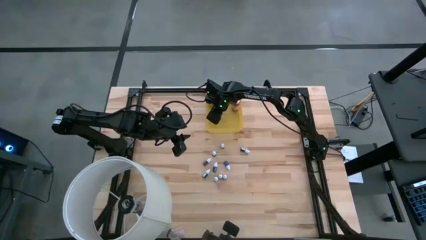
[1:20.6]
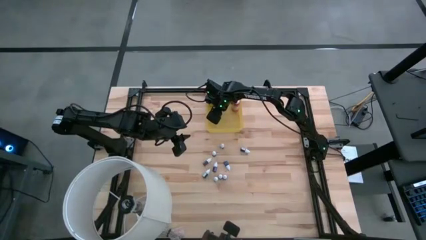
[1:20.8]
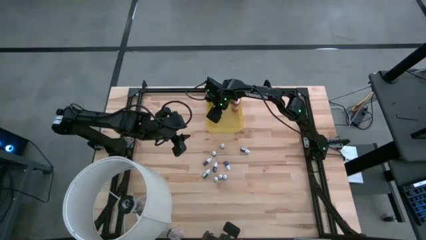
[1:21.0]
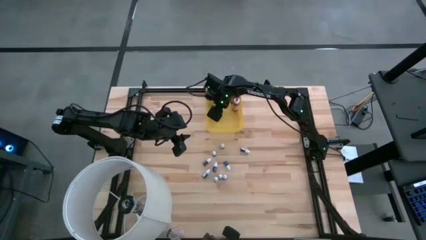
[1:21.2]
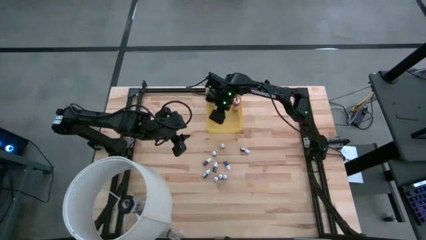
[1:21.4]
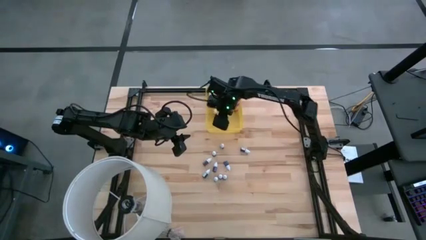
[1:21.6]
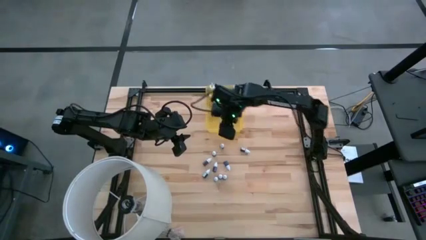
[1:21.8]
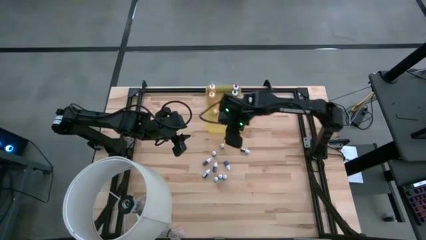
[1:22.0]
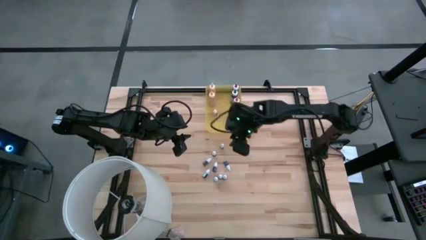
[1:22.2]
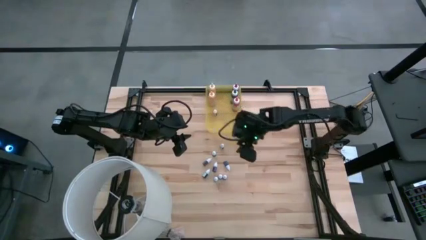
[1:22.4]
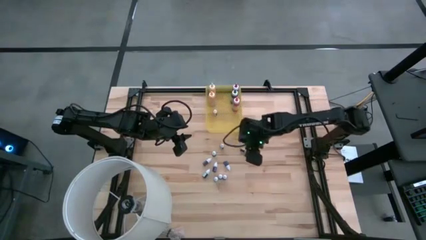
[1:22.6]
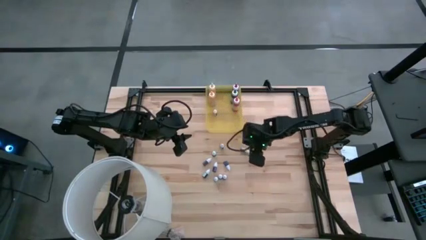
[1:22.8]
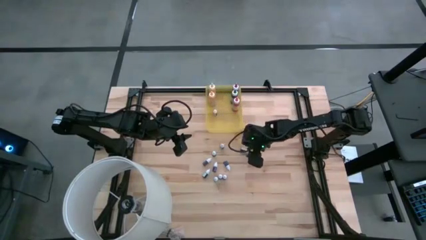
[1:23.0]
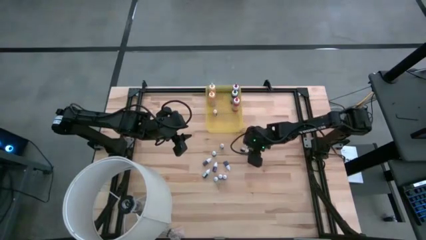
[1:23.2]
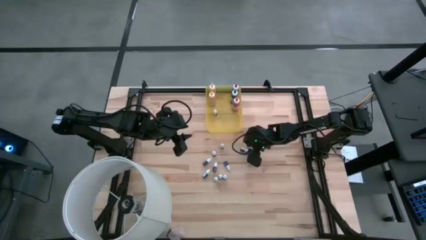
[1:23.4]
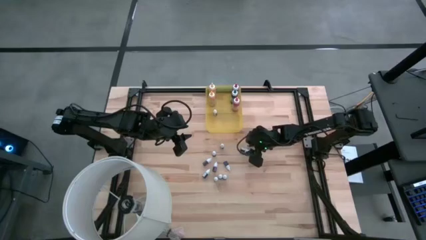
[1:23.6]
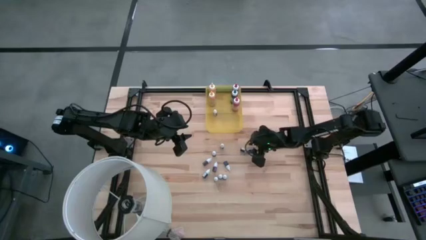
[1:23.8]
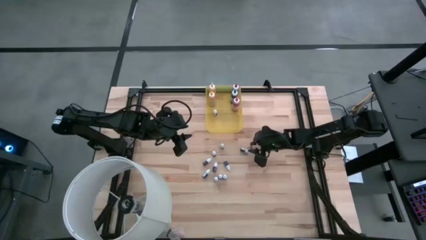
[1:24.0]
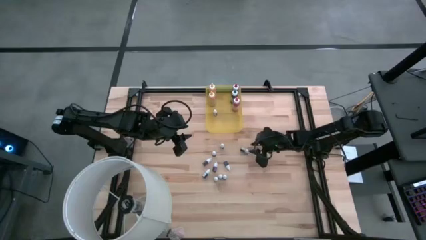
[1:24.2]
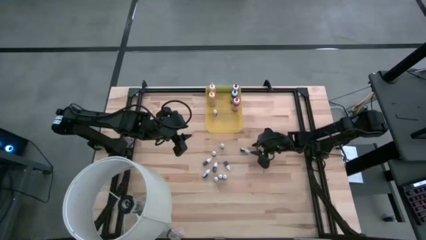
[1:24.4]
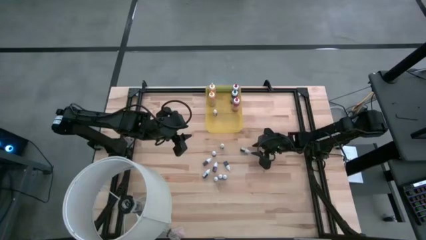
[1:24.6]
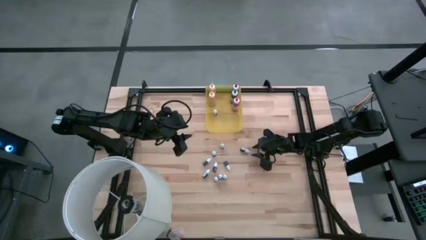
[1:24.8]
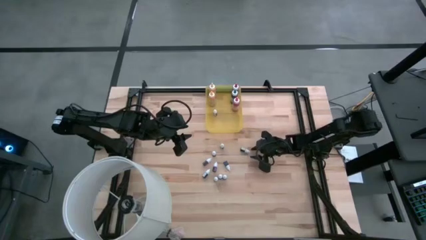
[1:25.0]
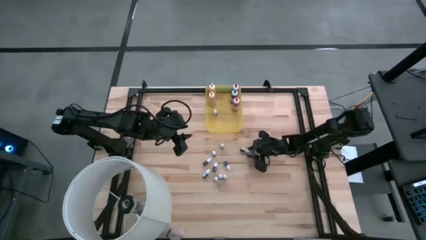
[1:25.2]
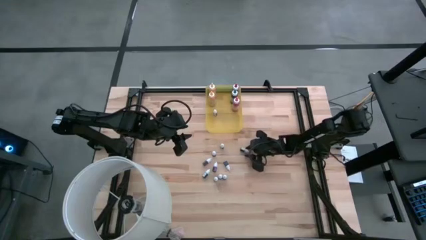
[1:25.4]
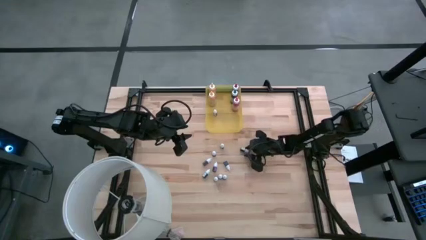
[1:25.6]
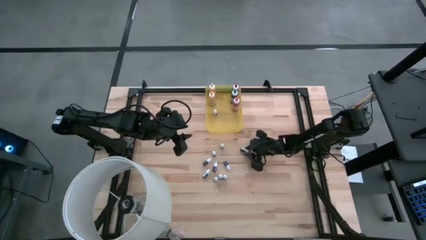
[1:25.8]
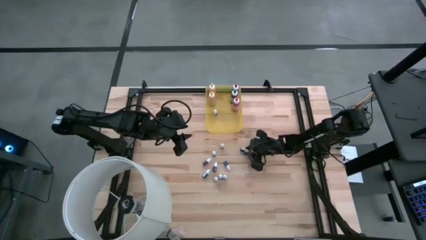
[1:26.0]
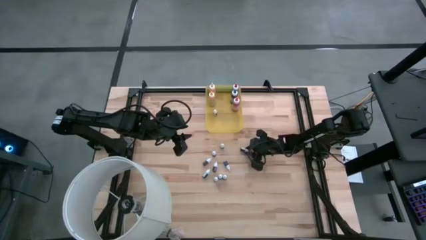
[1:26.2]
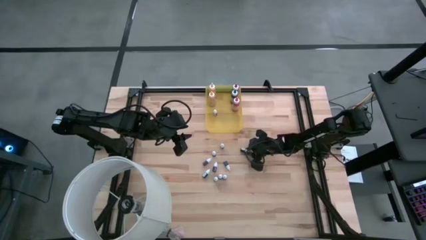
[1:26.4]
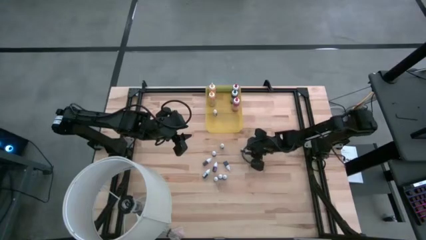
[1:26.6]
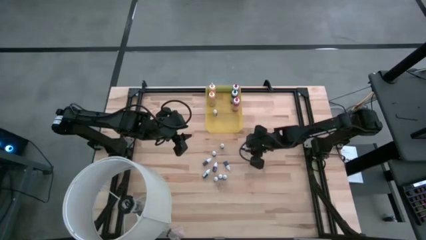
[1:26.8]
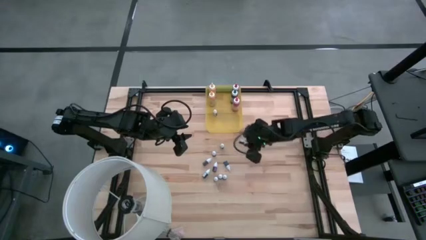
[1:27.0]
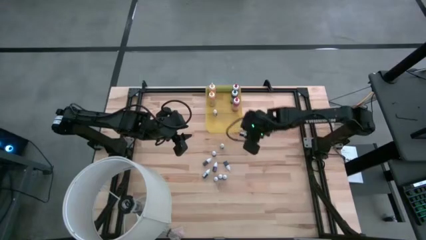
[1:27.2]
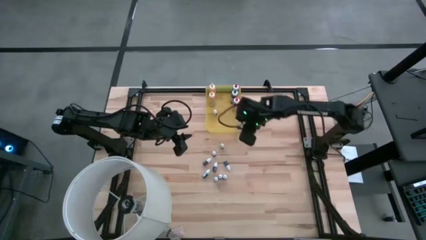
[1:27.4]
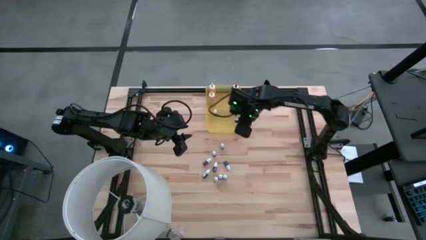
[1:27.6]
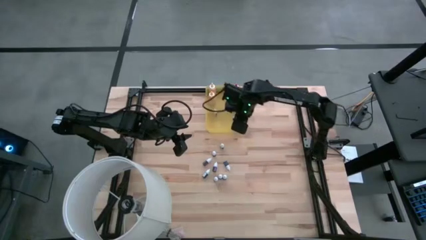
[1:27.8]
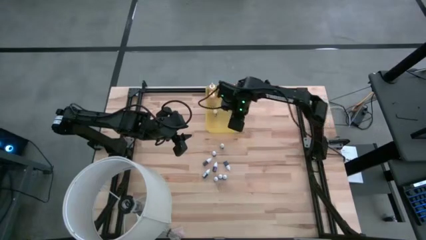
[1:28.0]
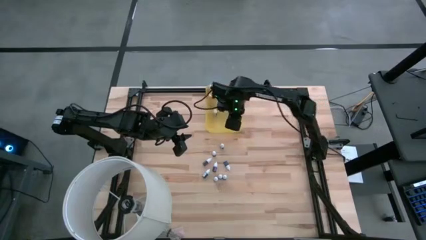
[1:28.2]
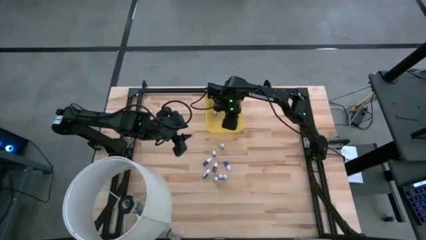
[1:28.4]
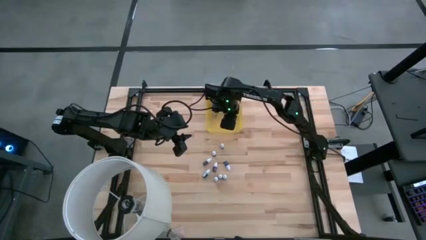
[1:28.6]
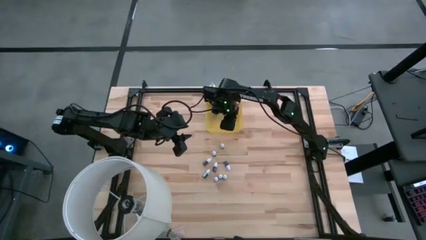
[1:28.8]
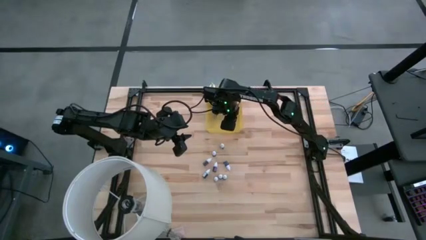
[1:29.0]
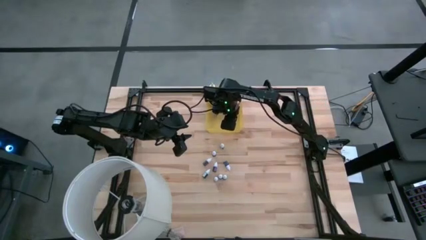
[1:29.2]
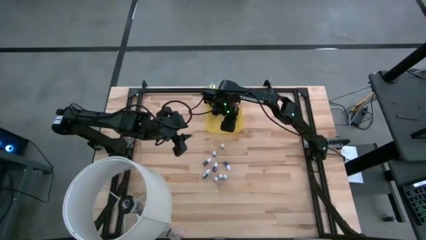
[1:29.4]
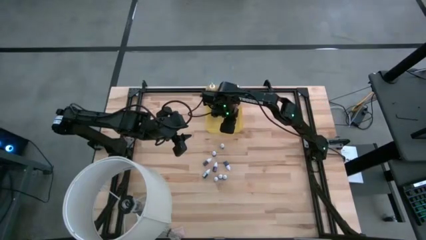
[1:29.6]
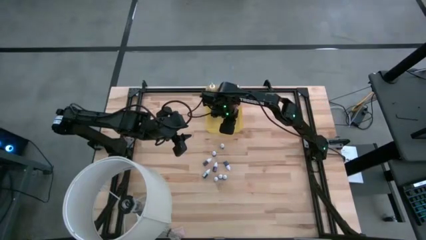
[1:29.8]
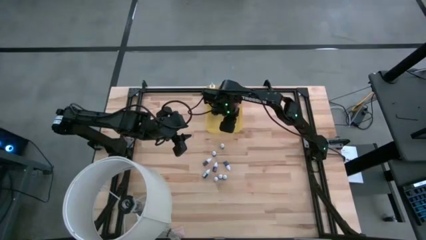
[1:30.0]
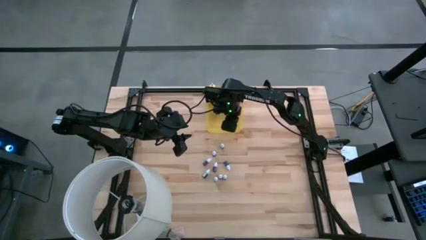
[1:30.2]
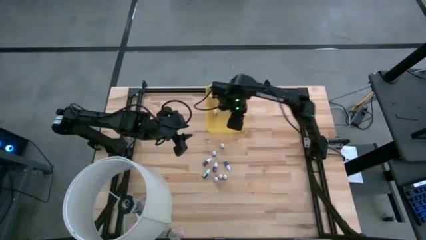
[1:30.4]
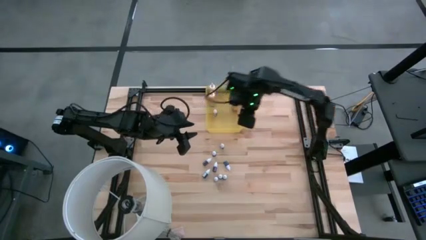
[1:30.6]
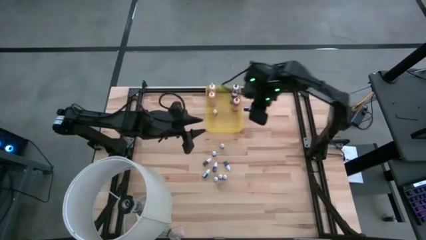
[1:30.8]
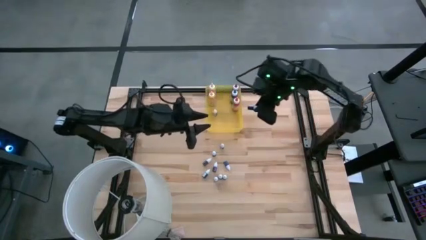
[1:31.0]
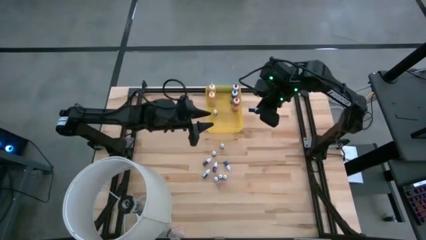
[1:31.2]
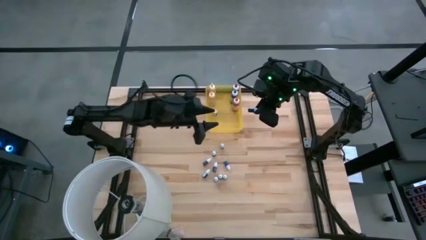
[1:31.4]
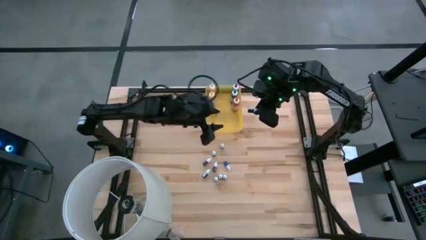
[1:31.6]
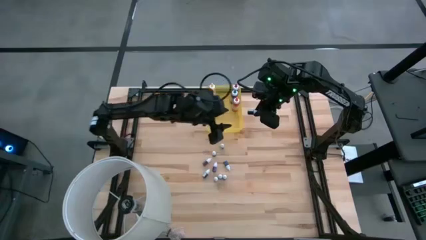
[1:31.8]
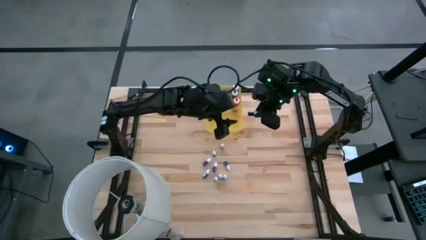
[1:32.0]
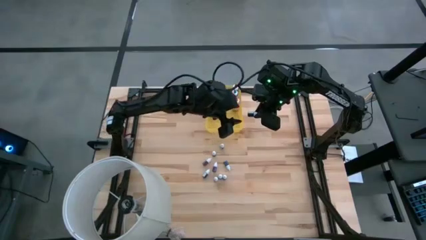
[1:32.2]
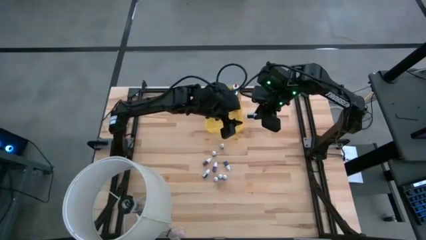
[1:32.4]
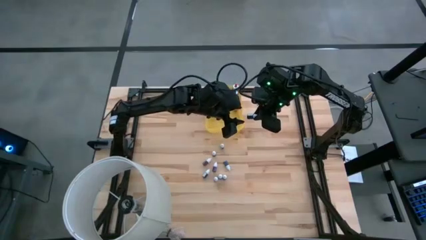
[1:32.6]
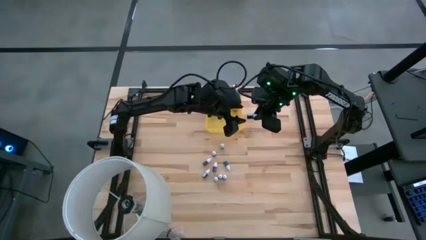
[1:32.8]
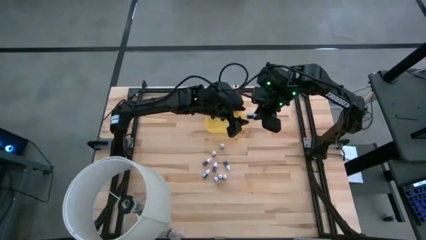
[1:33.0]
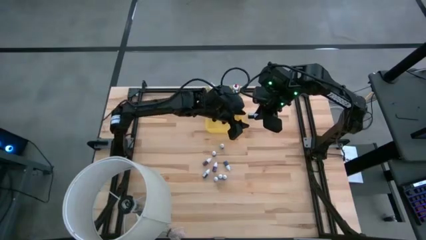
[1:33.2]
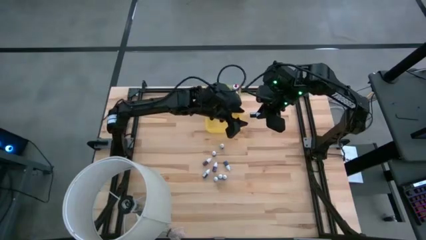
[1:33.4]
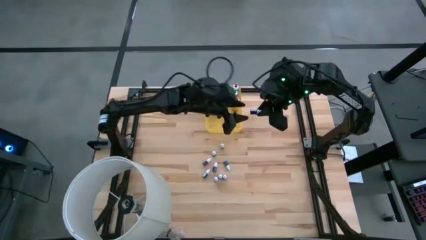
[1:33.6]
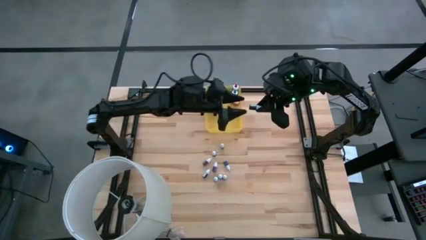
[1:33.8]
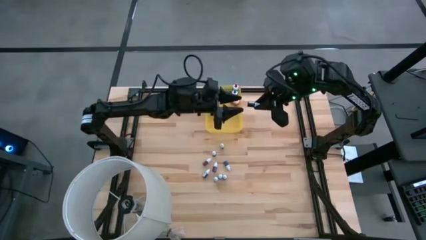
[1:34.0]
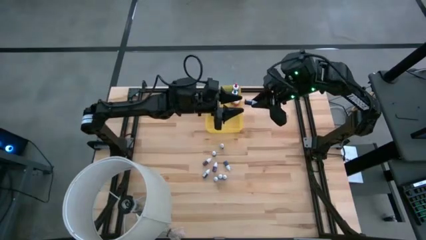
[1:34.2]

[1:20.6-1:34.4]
Task: Pick & Place food coloring
Put the top small black food coloring bottle into the yellow bin
